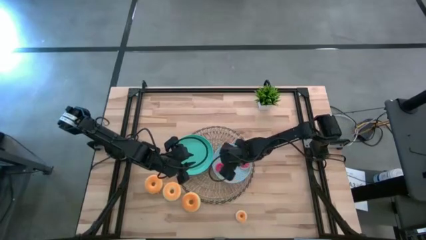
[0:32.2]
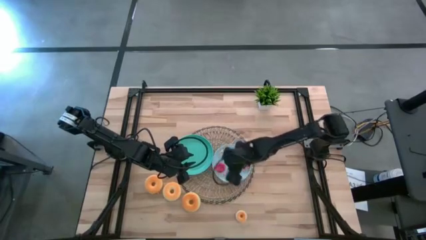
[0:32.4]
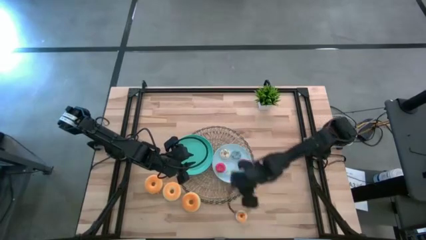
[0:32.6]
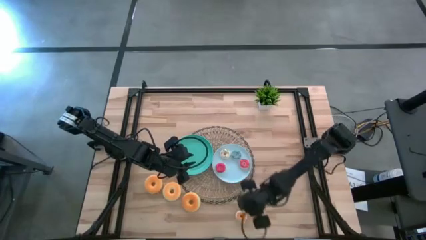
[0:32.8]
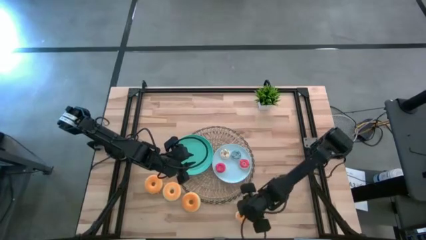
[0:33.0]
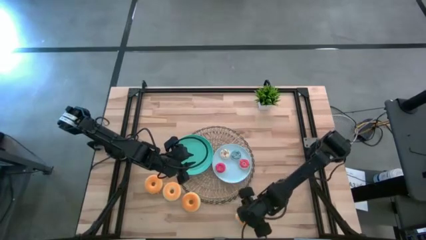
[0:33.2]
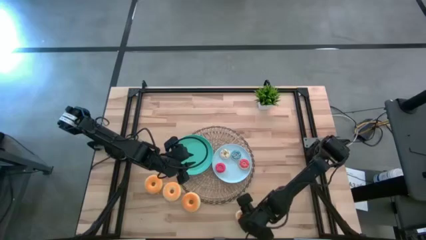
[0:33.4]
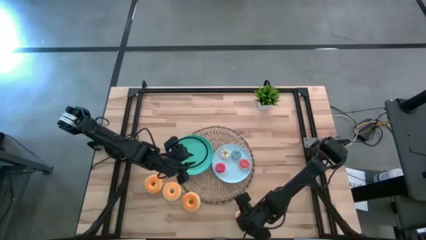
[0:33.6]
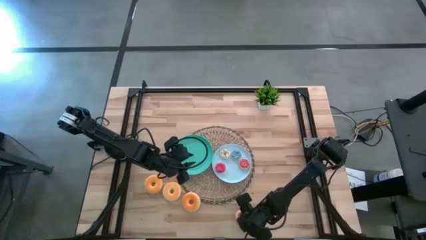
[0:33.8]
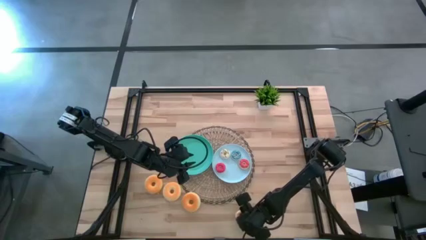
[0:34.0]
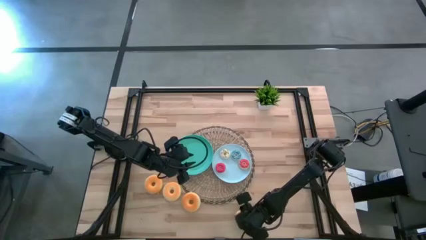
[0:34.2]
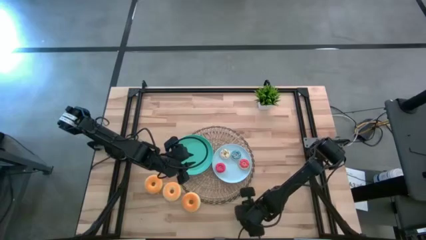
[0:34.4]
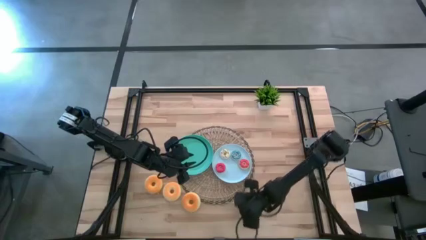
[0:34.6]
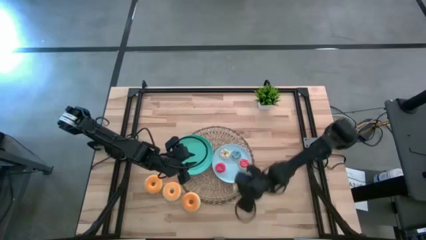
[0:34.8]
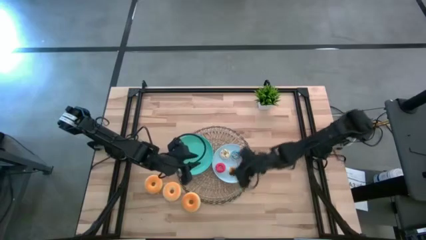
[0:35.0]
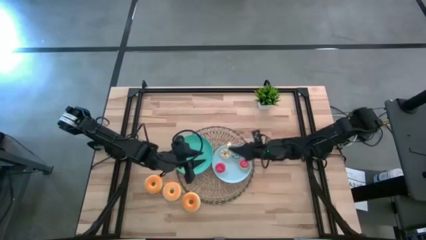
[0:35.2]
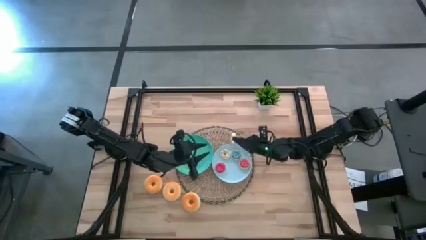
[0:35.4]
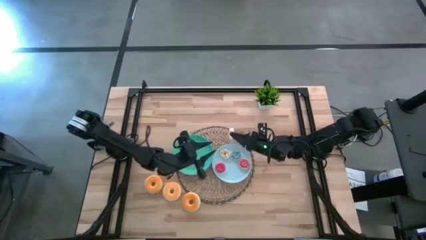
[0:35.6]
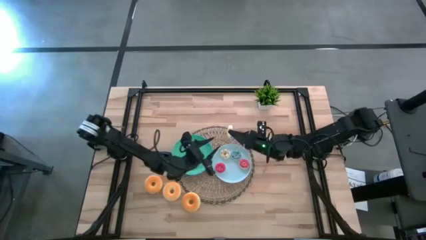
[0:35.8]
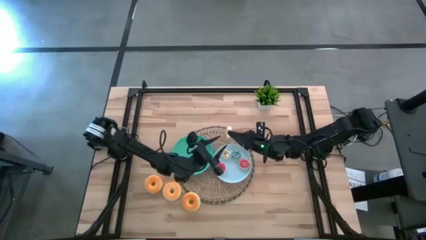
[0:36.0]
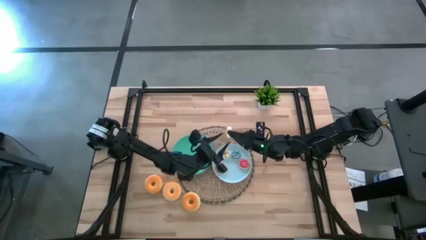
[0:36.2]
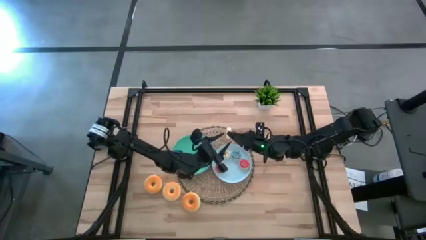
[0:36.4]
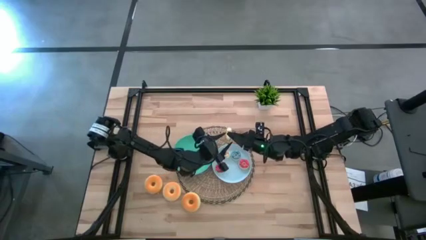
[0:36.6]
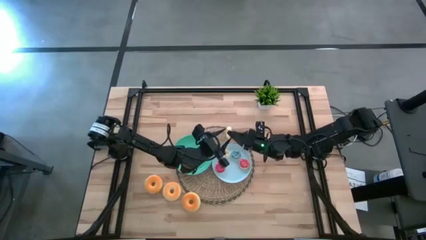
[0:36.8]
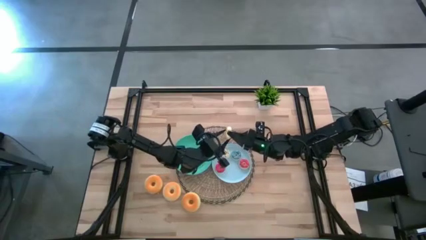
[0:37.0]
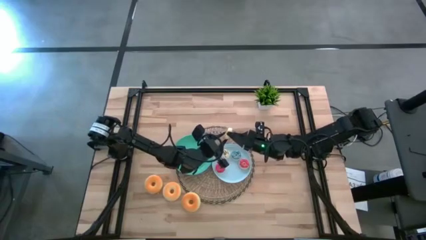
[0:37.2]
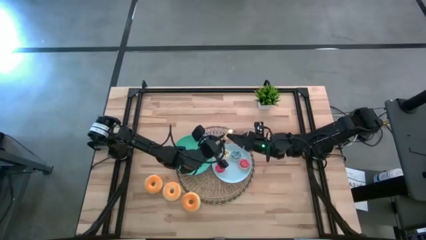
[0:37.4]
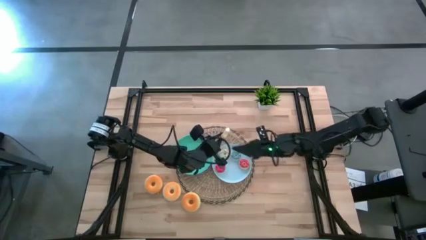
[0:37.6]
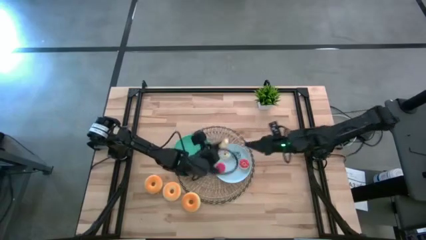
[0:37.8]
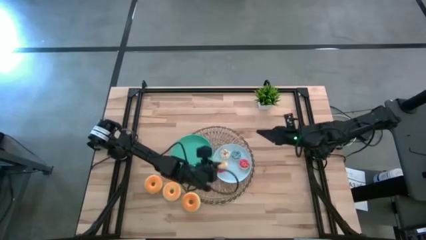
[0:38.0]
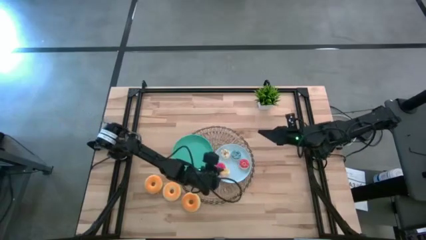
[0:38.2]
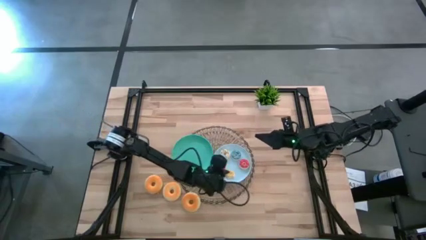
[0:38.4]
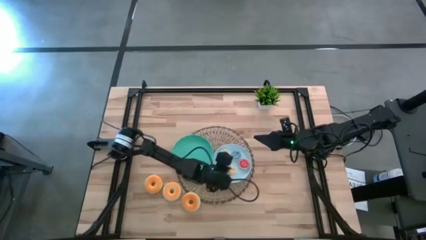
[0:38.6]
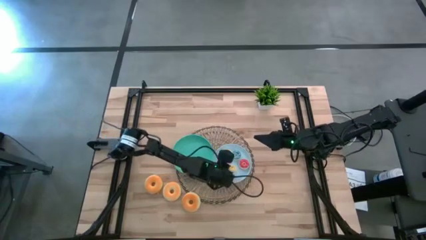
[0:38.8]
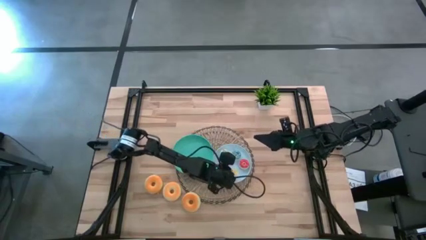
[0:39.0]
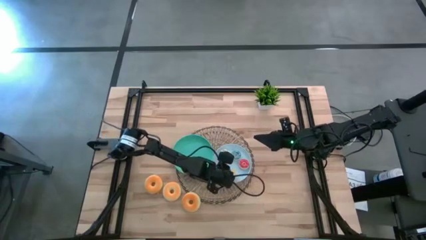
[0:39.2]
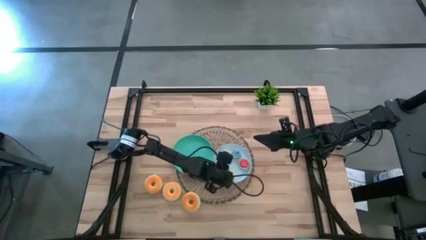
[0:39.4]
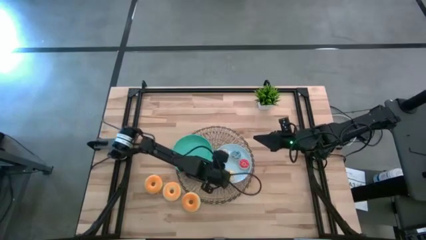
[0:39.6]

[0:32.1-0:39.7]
Task: Pick & Place donuts
Put the small yellow donut on the light blue plate

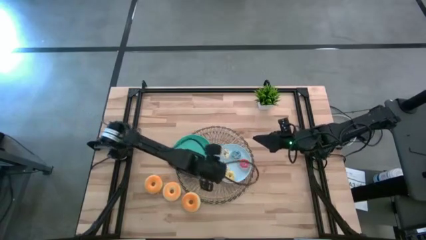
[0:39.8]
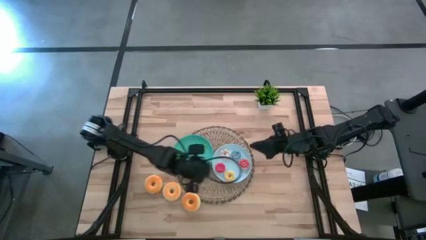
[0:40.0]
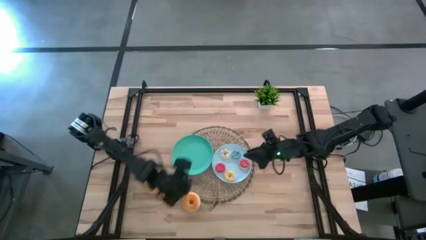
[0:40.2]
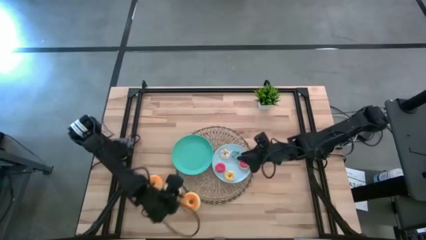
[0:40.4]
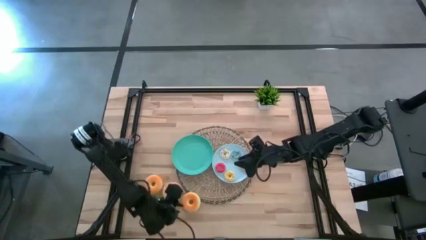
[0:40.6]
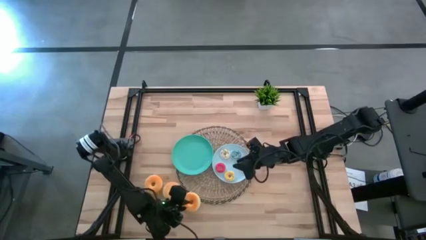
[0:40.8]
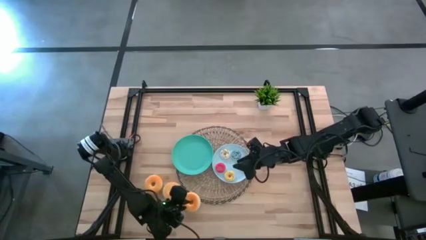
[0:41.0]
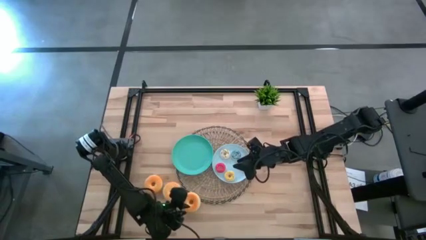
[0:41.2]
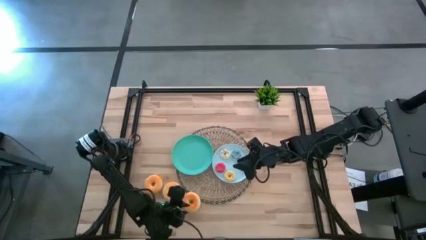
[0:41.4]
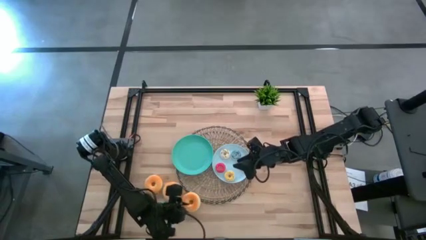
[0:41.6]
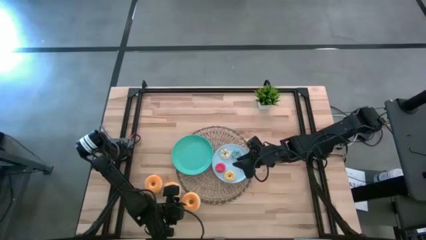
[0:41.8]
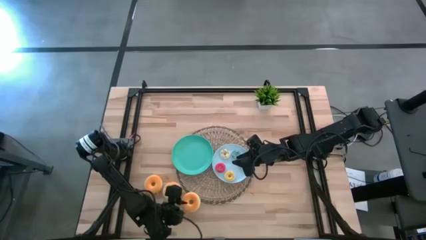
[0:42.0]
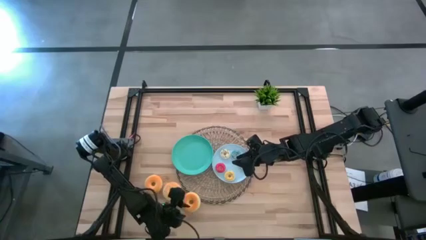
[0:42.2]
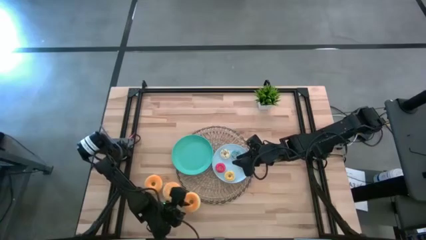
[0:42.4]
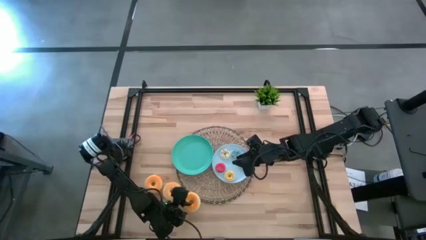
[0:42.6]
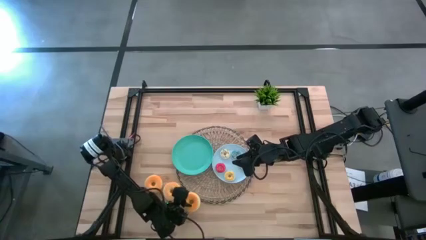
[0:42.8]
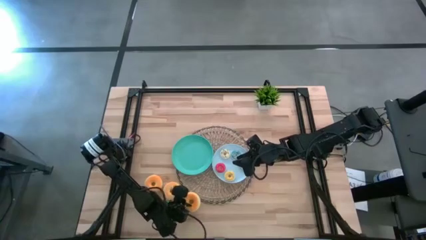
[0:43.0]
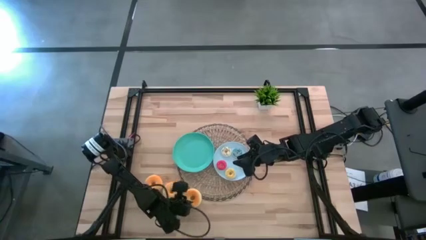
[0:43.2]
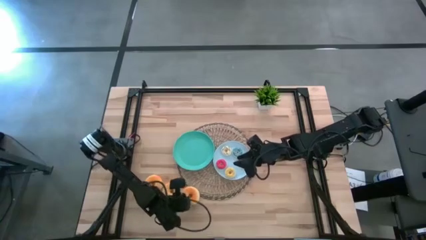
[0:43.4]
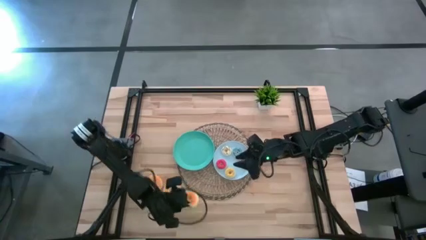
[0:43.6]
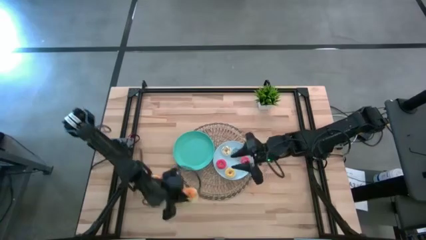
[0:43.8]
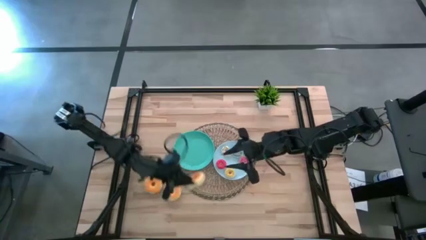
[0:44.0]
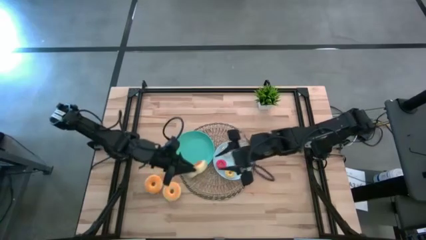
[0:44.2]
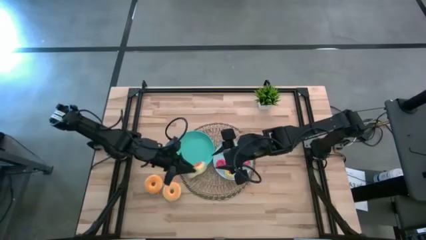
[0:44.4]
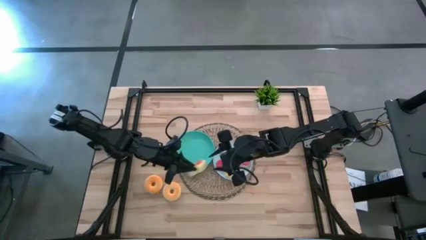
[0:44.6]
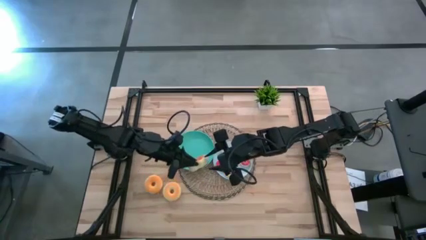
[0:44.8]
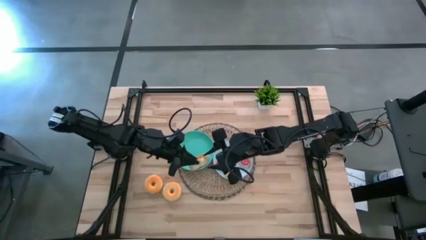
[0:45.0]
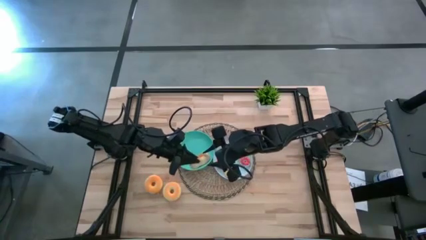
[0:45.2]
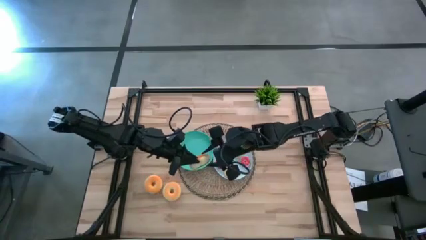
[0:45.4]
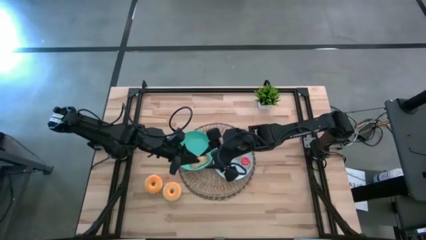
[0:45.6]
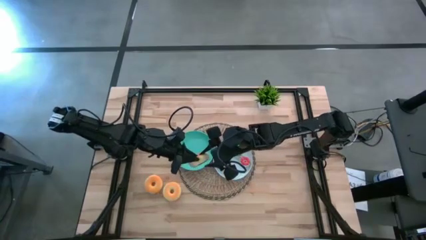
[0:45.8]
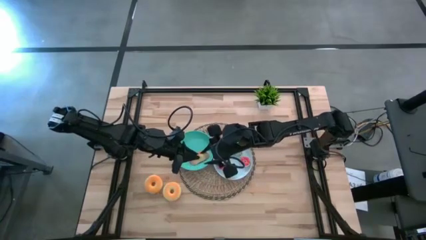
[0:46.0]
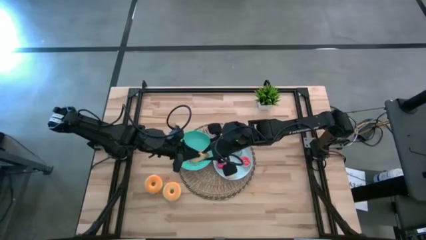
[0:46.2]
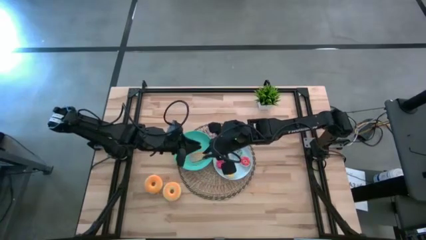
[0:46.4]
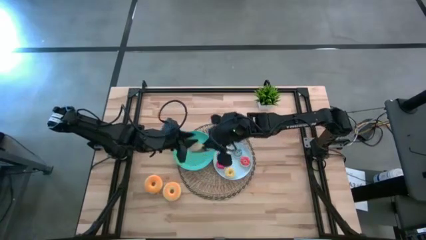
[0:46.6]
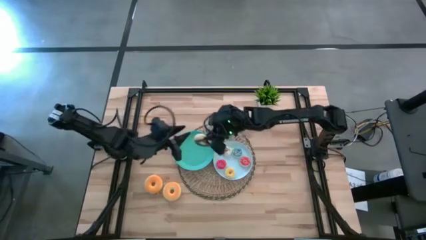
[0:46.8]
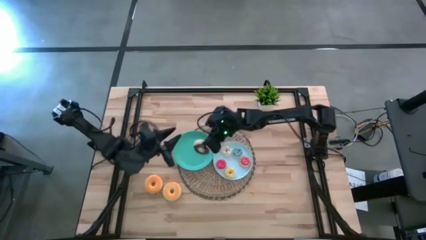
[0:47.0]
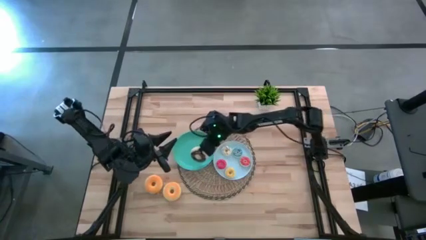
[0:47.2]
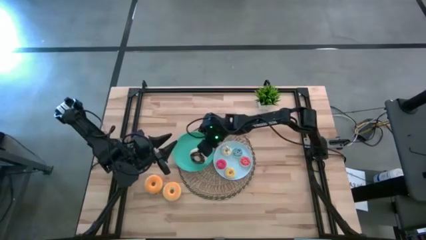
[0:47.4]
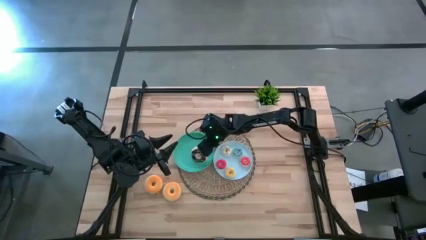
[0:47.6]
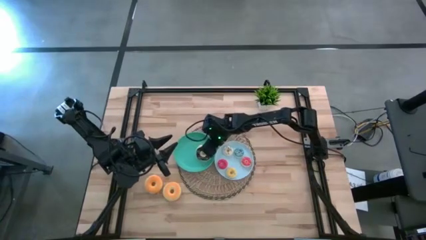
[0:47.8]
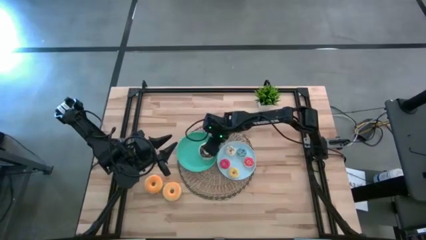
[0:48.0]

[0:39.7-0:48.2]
Put the big black donut on the green plate
